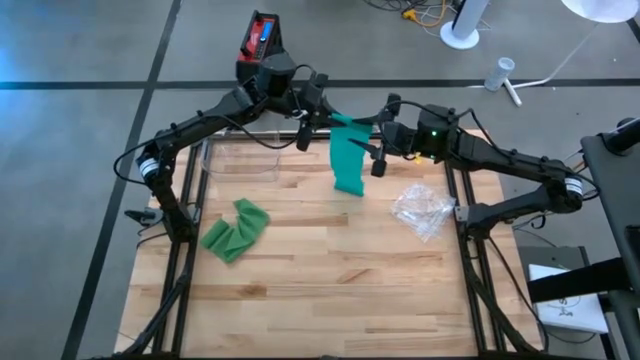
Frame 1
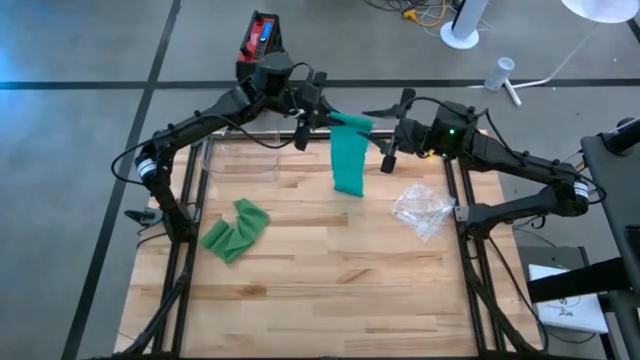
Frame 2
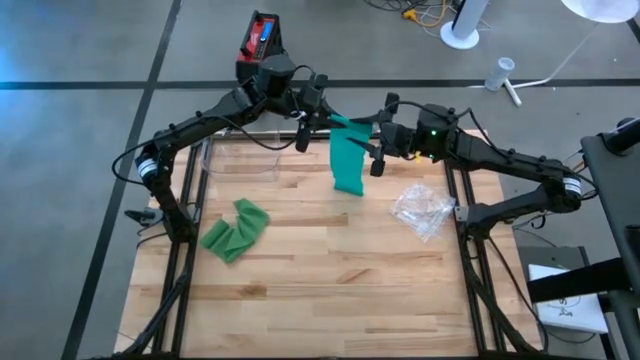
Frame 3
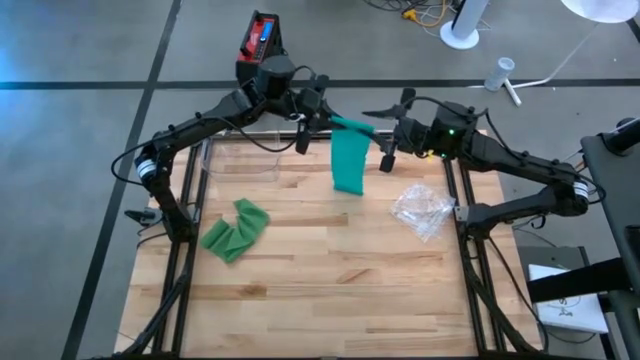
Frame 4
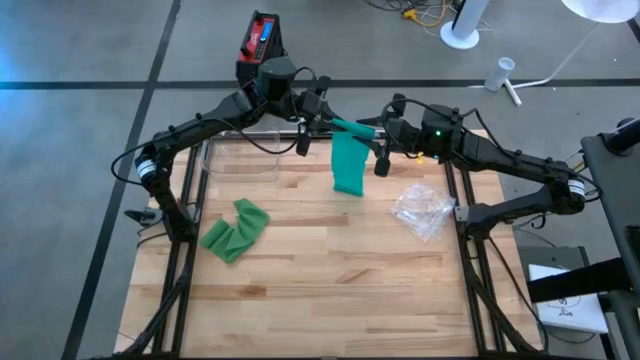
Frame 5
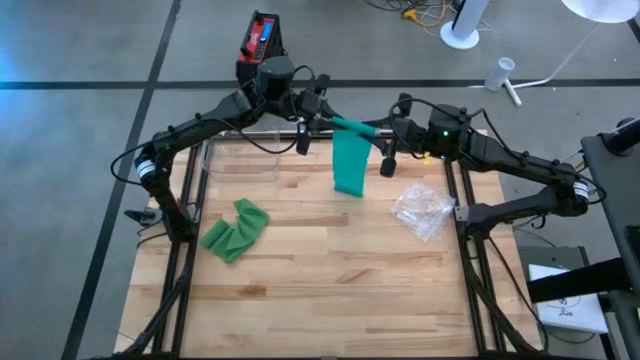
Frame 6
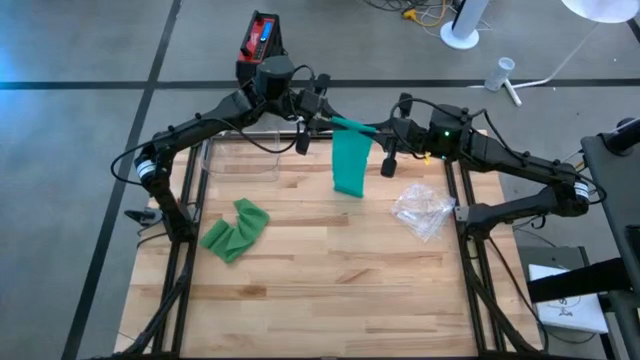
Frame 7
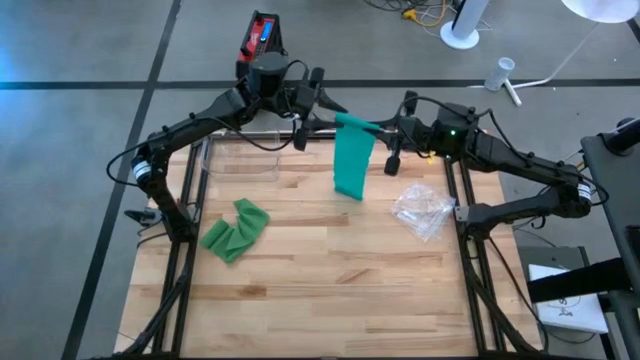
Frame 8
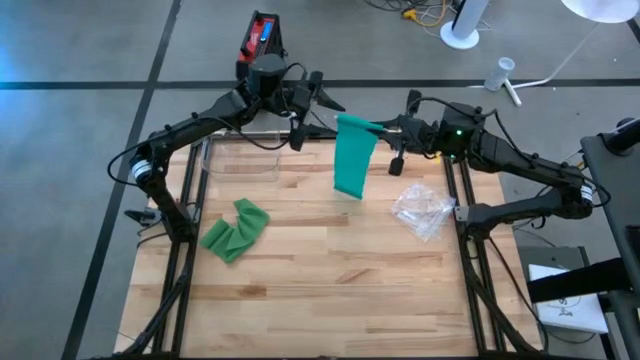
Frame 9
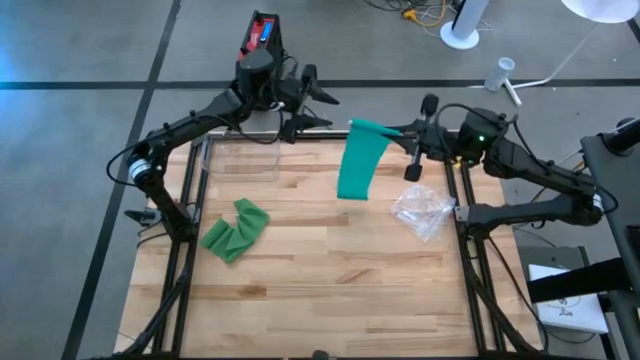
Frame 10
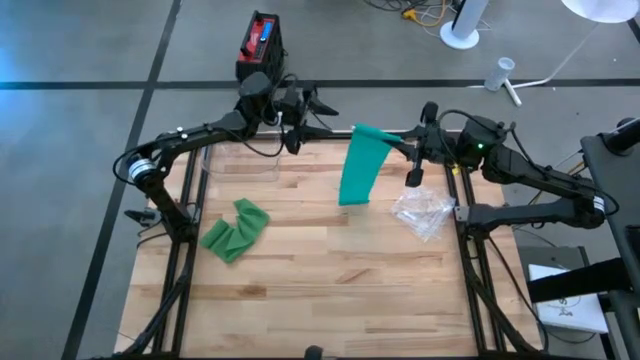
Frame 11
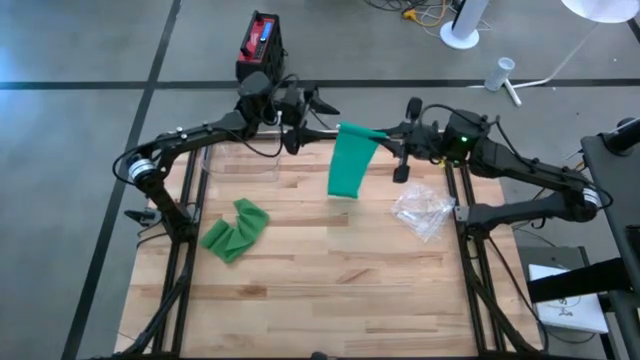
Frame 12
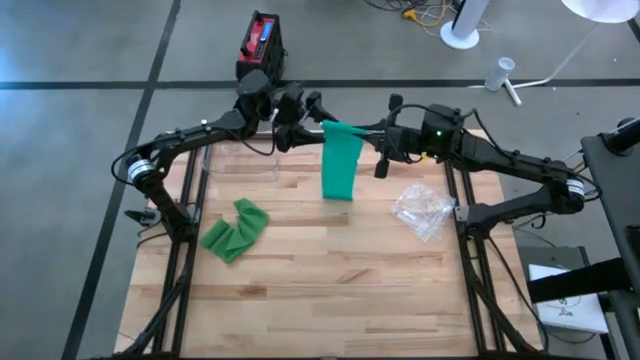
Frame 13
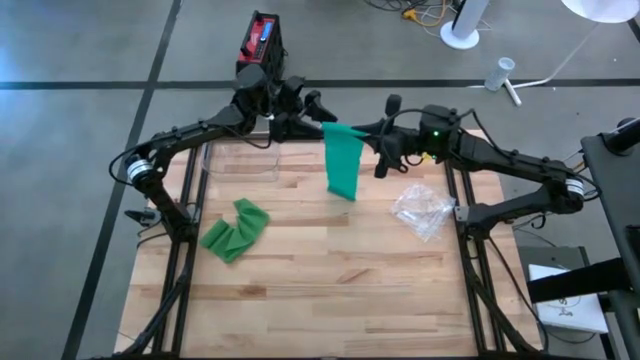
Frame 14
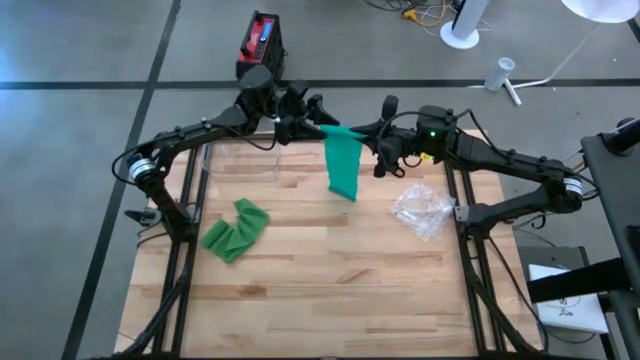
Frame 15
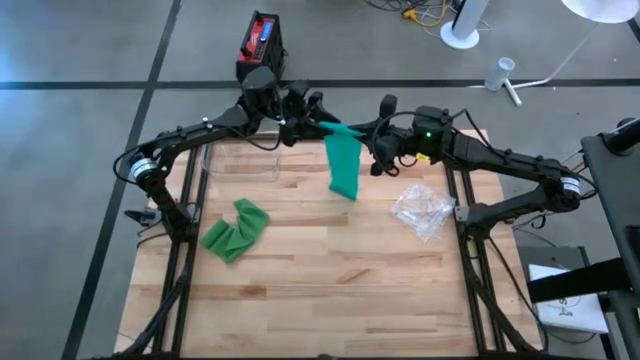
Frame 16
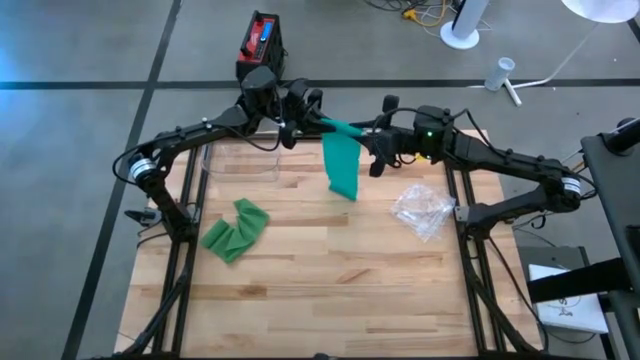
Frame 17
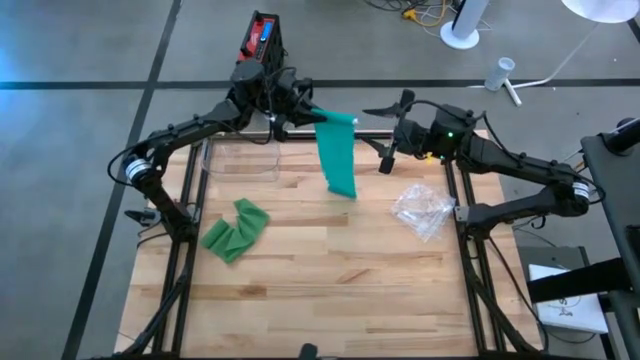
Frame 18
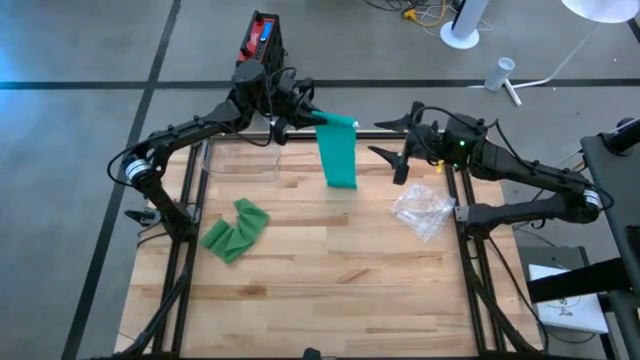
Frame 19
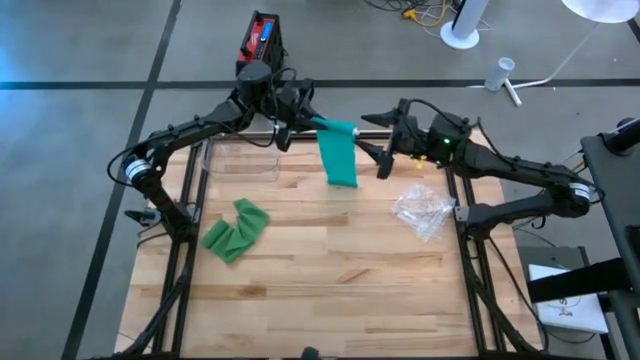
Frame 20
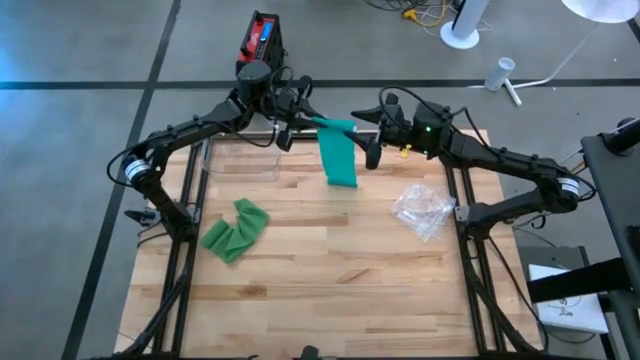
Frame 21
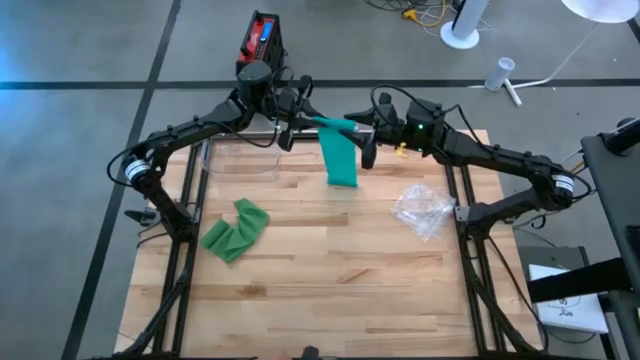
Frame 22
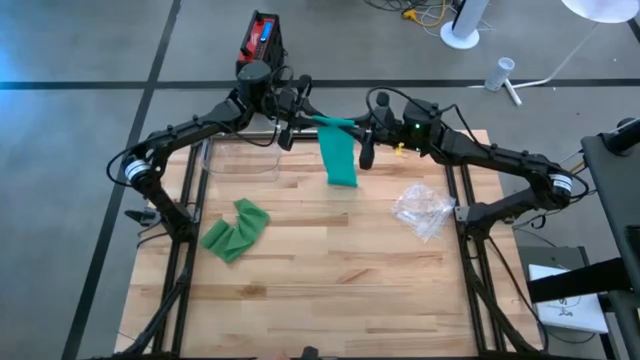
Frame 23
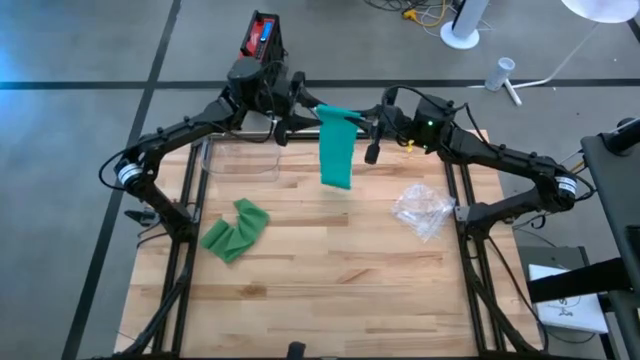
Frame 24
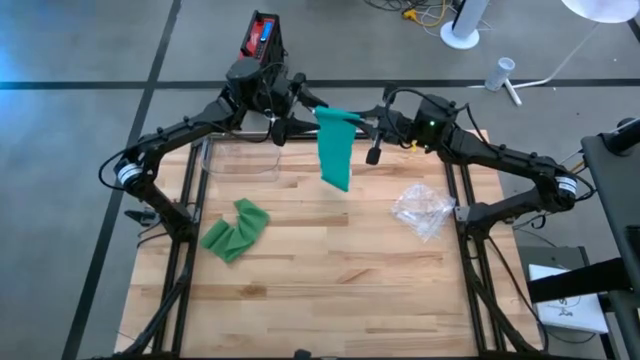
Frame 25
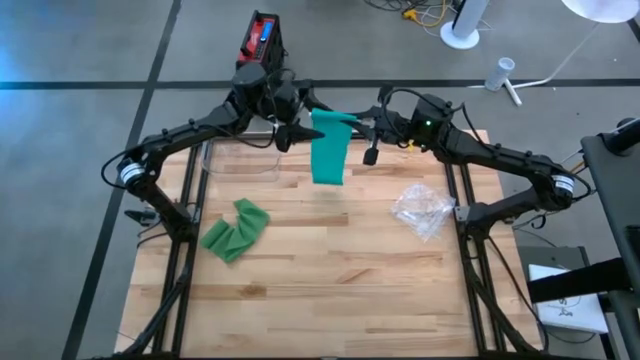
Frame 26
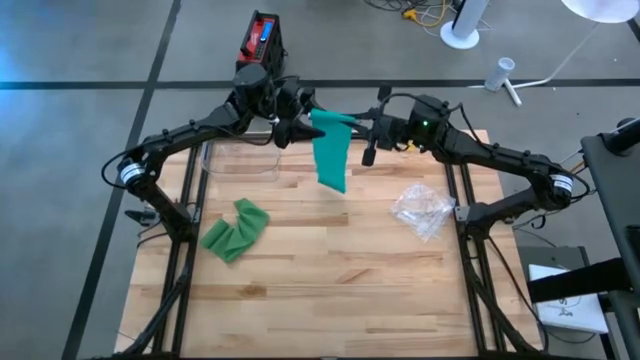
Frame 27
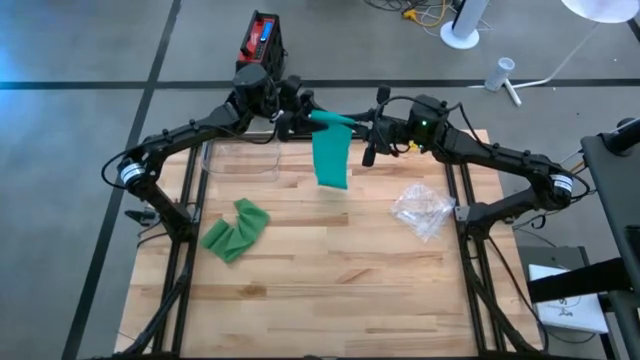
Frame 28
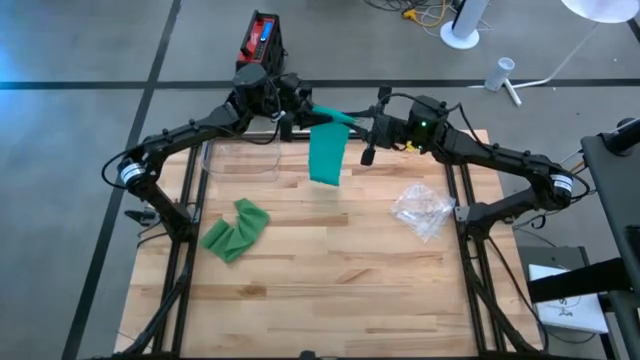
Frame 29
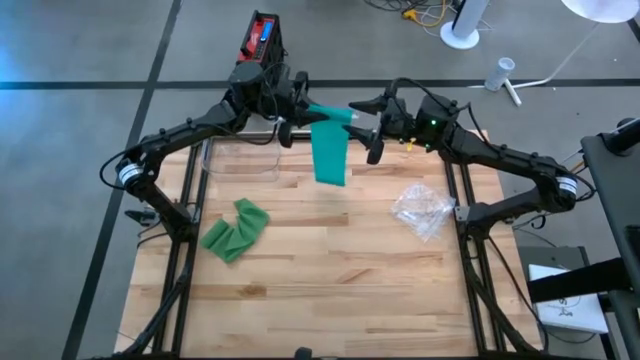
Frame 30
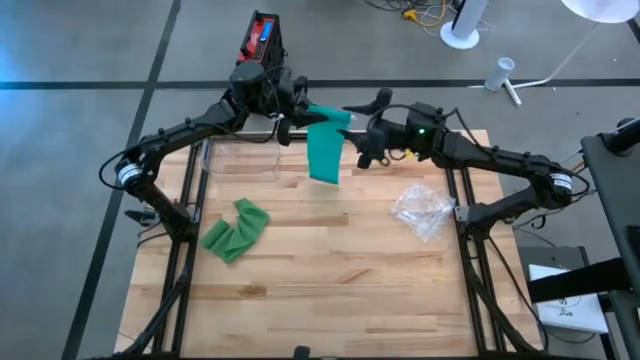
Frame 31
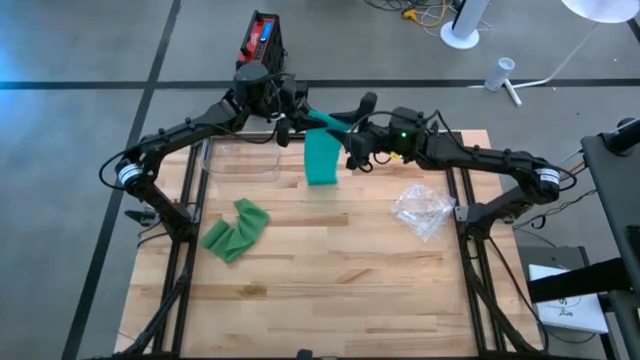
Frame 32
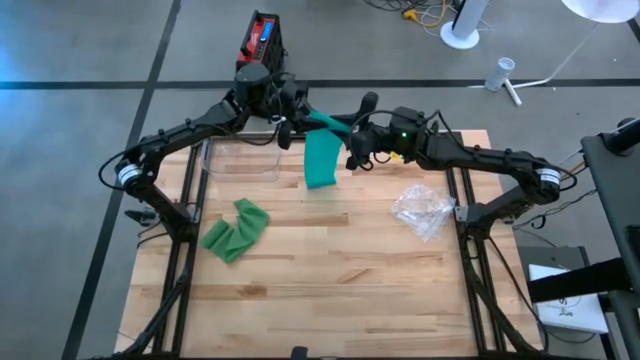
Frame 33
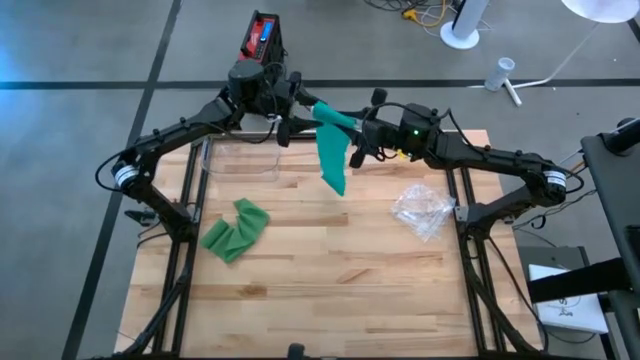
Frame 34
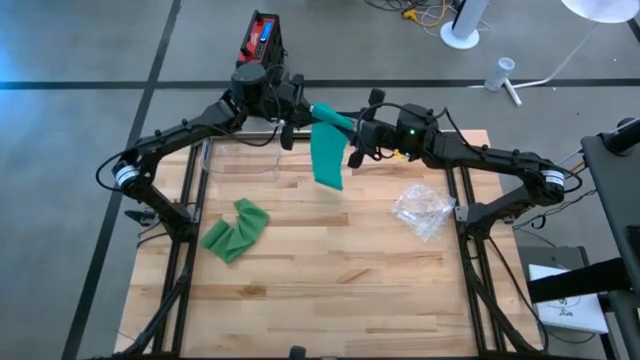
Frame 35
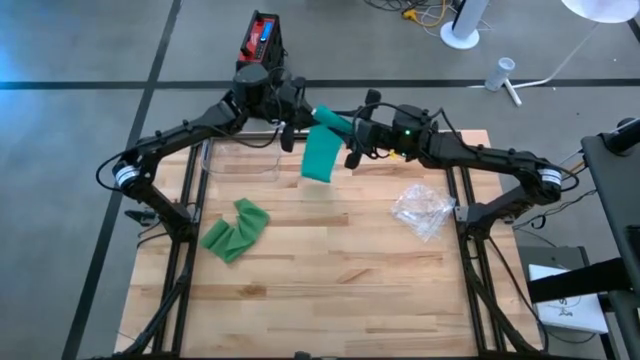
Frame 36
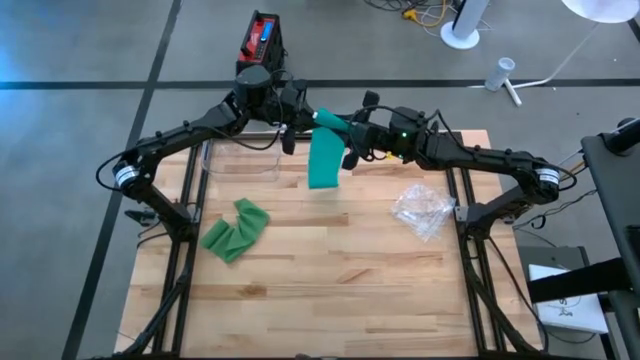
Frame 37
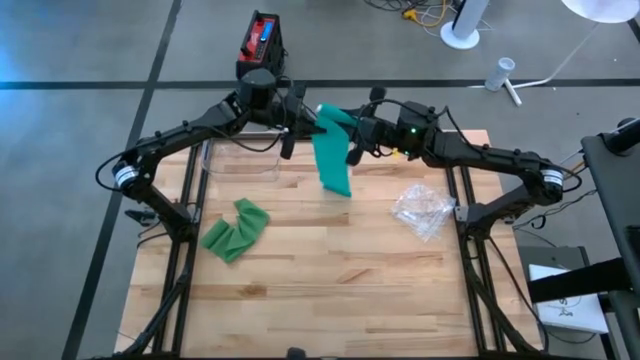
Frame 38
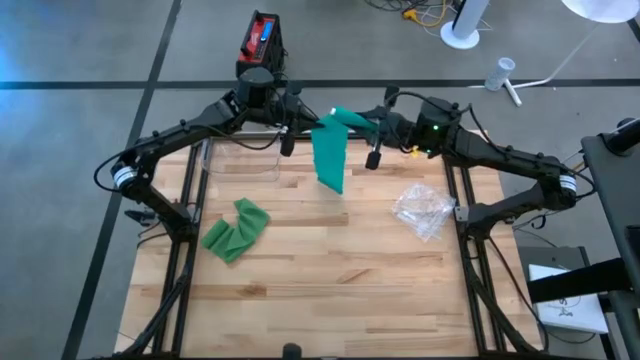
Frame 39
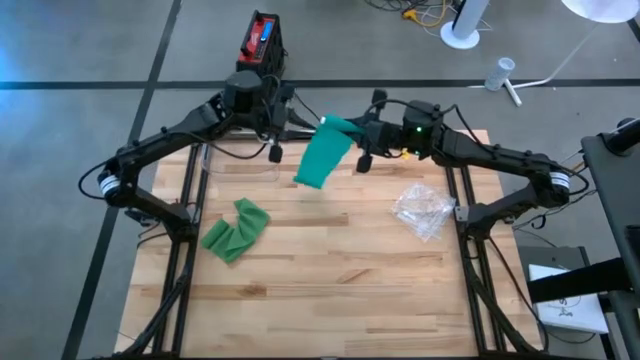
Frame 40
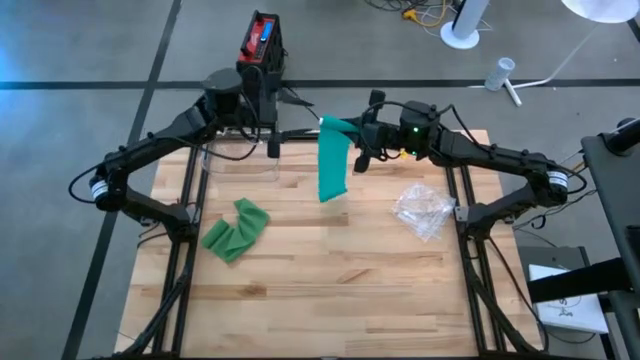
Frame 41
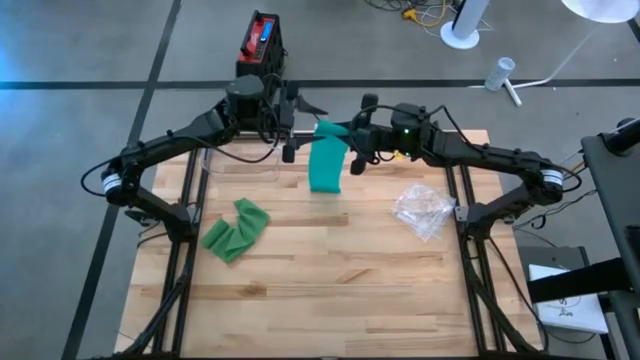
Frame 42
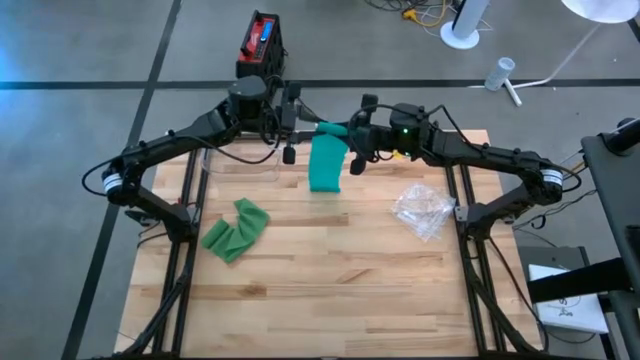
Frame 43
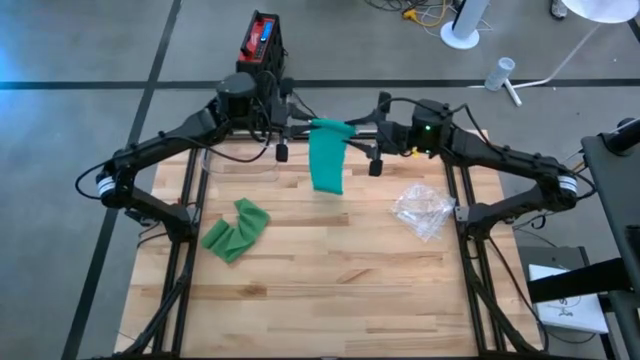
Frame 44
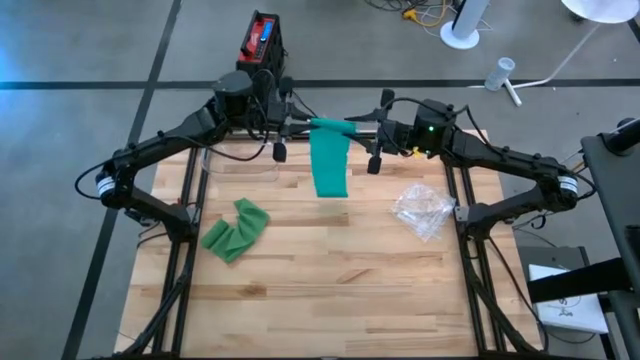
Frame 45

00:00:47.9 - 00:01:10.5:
Task: Roll bandage
Roll the blue bandage
